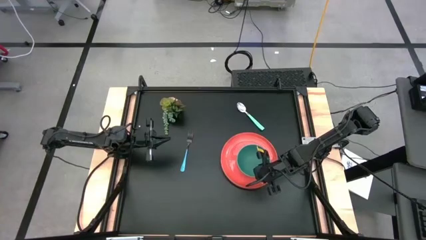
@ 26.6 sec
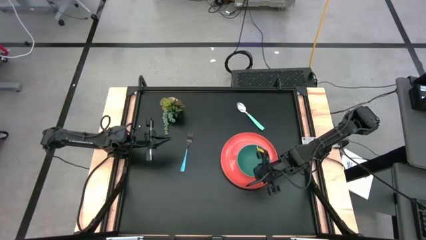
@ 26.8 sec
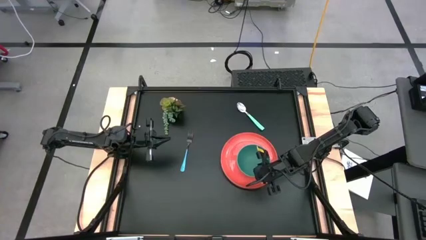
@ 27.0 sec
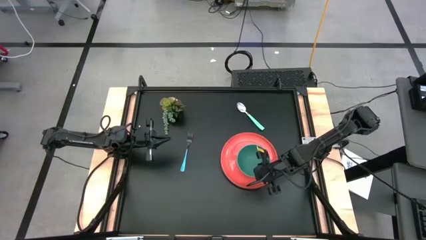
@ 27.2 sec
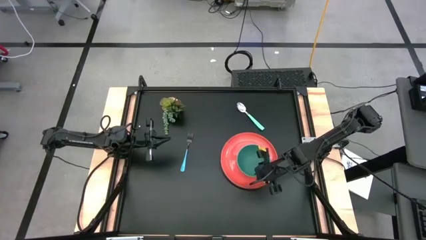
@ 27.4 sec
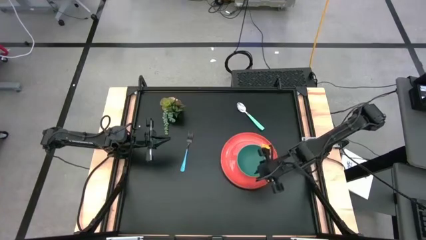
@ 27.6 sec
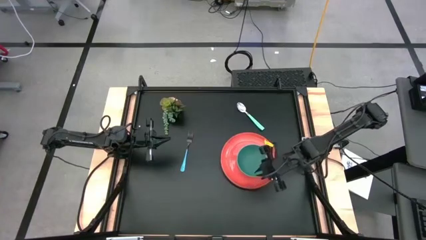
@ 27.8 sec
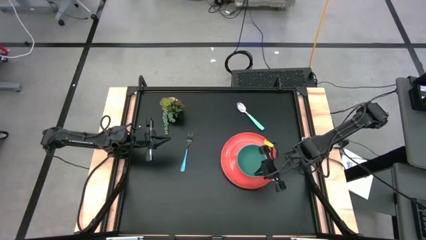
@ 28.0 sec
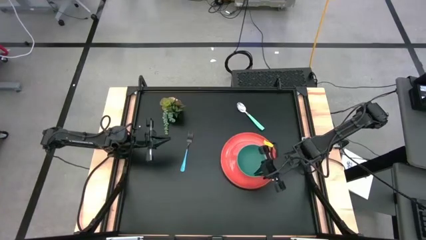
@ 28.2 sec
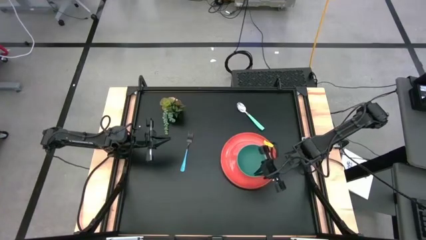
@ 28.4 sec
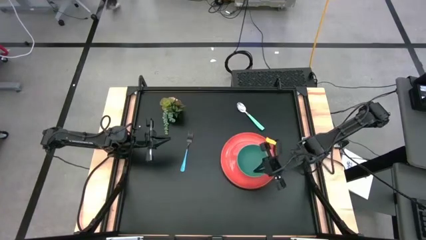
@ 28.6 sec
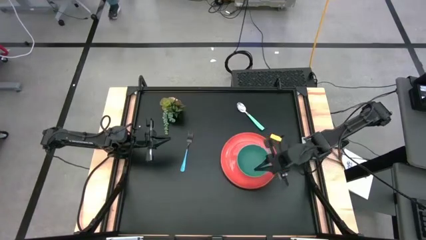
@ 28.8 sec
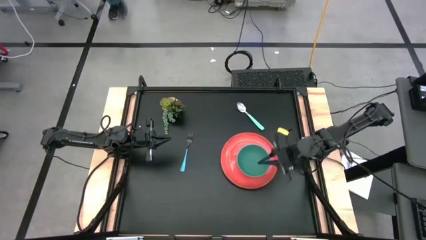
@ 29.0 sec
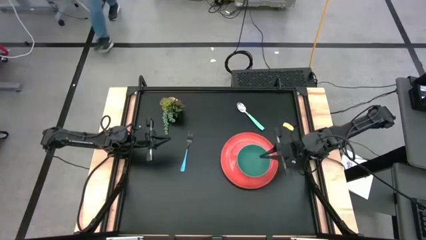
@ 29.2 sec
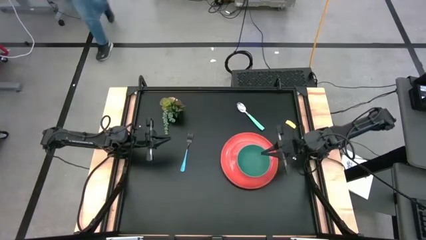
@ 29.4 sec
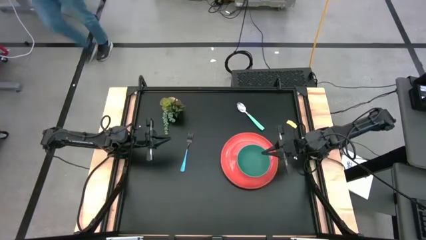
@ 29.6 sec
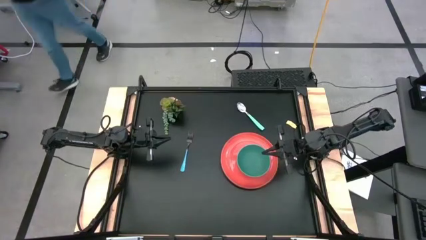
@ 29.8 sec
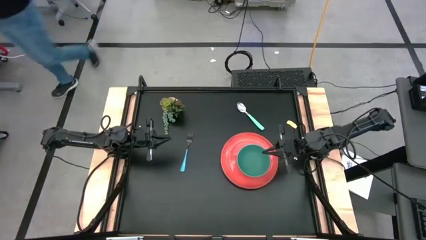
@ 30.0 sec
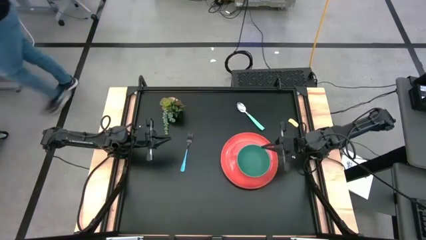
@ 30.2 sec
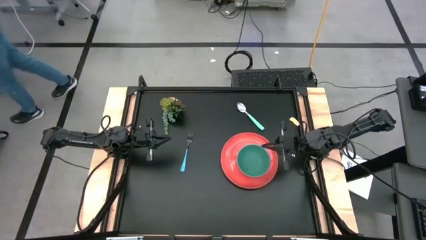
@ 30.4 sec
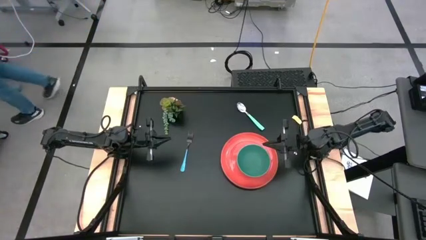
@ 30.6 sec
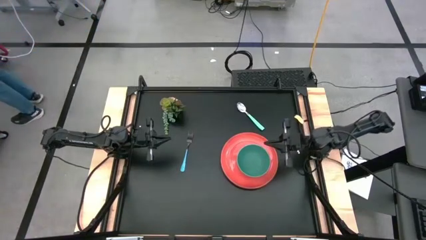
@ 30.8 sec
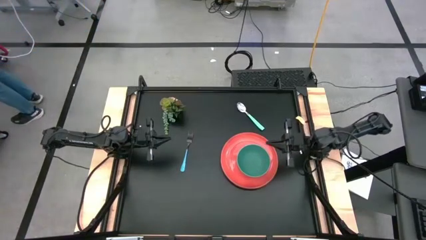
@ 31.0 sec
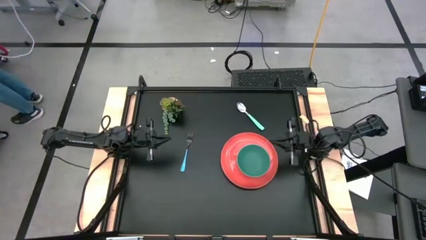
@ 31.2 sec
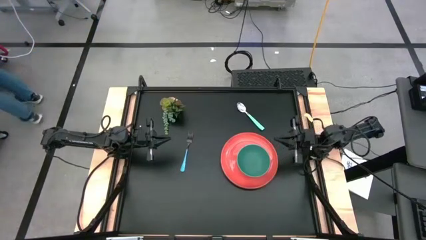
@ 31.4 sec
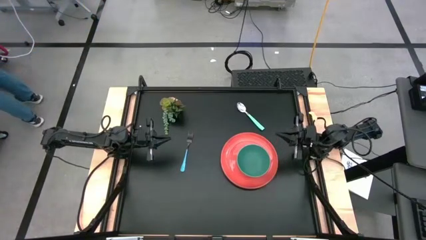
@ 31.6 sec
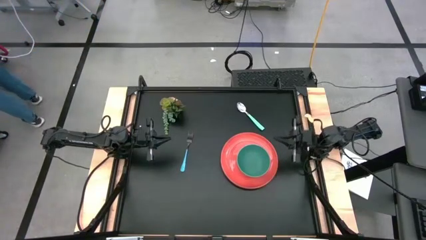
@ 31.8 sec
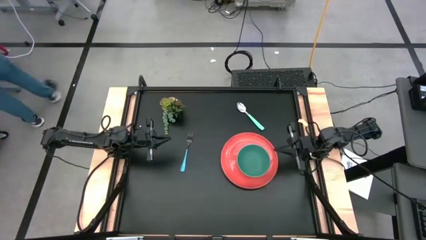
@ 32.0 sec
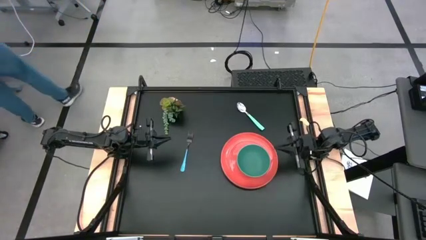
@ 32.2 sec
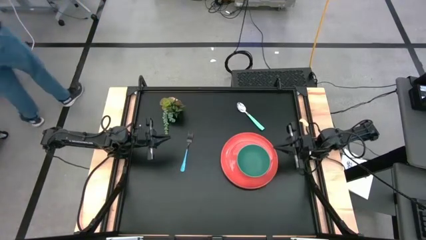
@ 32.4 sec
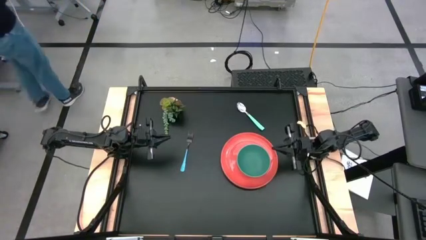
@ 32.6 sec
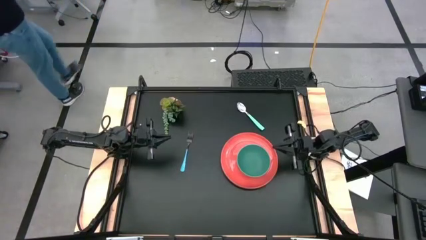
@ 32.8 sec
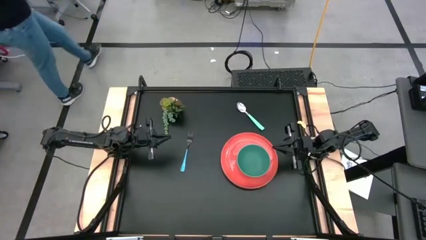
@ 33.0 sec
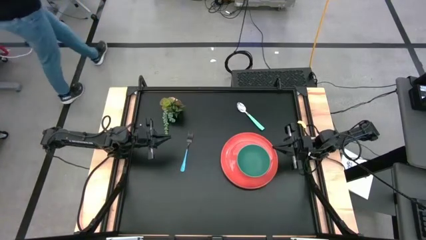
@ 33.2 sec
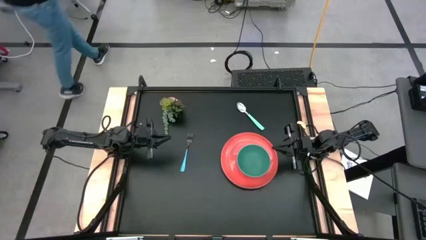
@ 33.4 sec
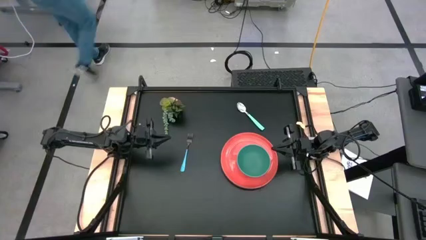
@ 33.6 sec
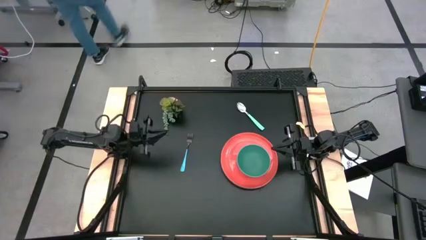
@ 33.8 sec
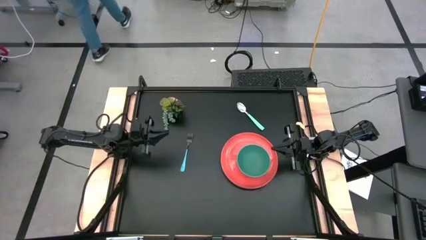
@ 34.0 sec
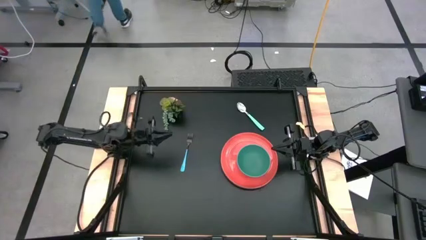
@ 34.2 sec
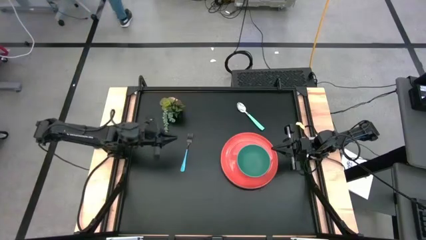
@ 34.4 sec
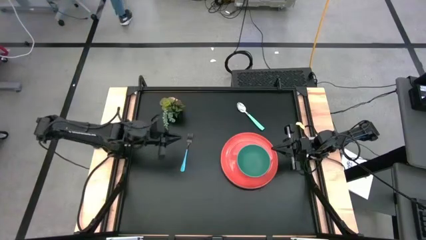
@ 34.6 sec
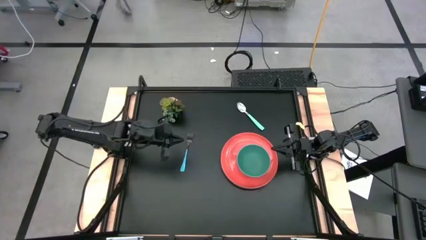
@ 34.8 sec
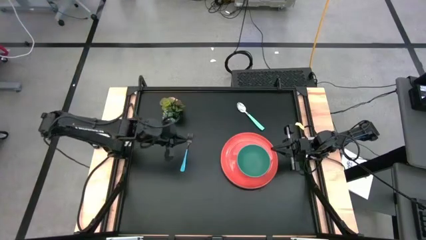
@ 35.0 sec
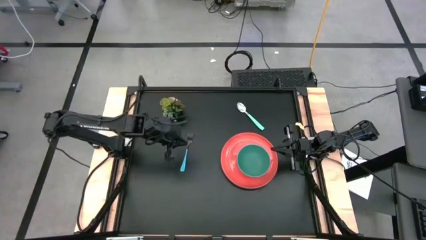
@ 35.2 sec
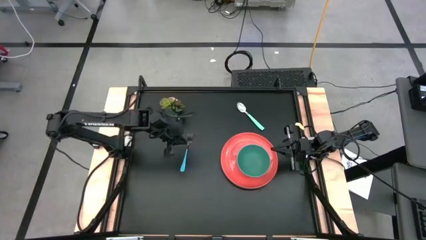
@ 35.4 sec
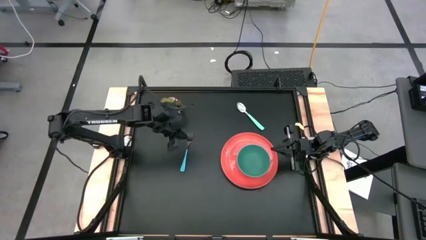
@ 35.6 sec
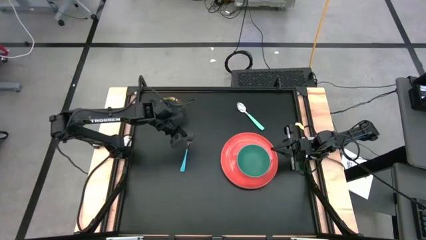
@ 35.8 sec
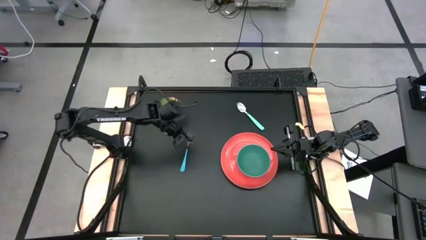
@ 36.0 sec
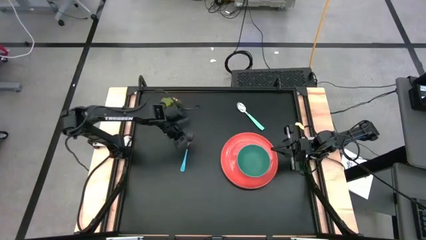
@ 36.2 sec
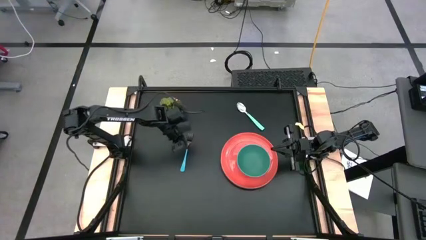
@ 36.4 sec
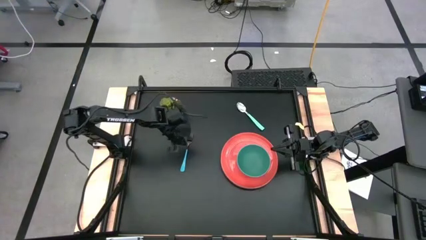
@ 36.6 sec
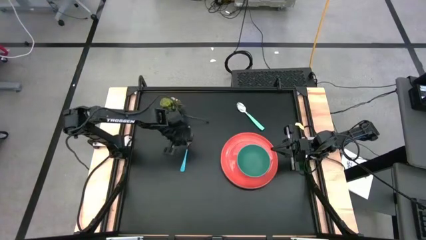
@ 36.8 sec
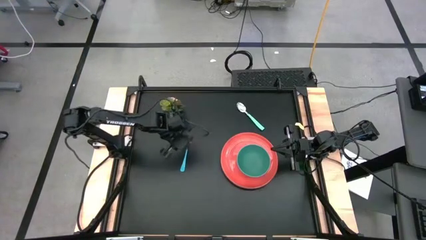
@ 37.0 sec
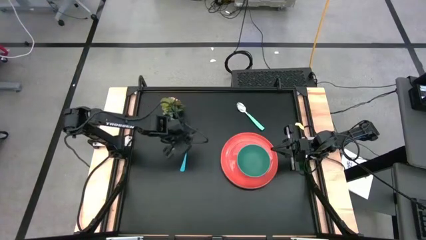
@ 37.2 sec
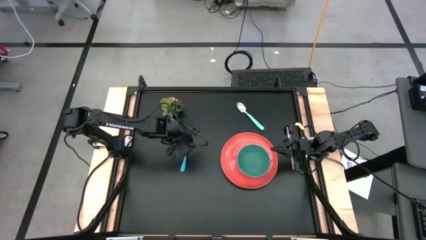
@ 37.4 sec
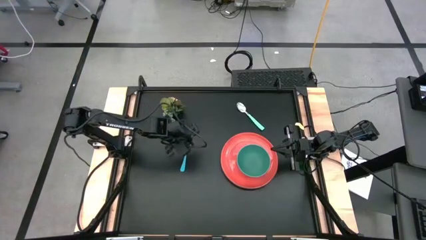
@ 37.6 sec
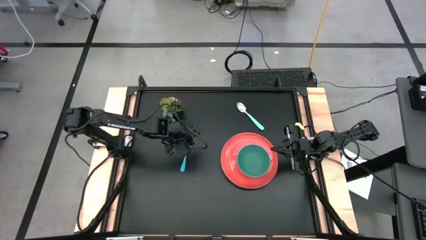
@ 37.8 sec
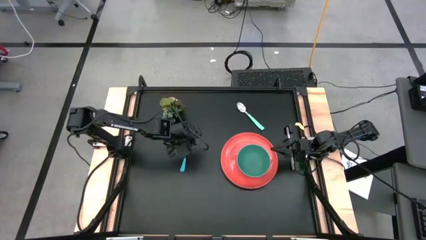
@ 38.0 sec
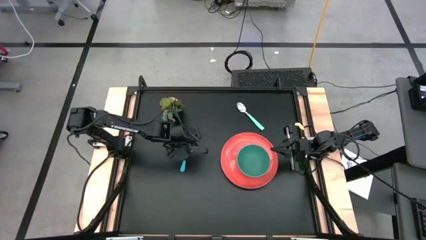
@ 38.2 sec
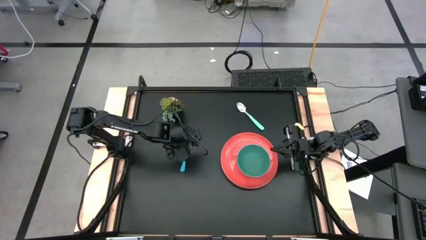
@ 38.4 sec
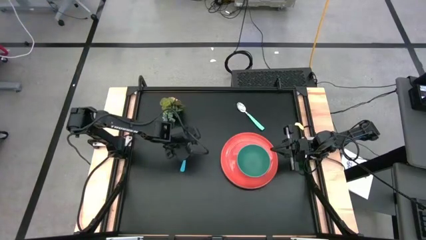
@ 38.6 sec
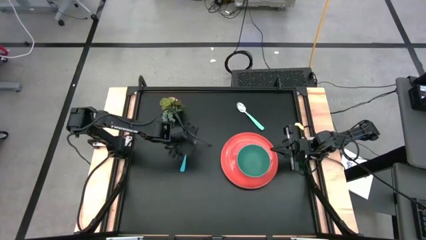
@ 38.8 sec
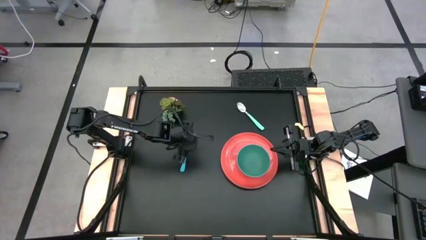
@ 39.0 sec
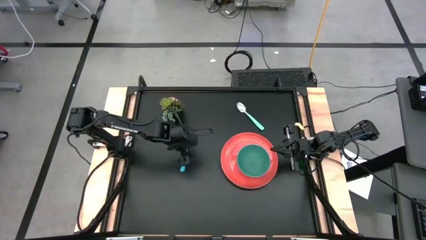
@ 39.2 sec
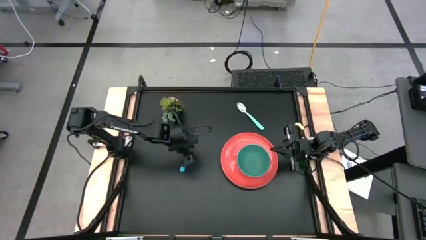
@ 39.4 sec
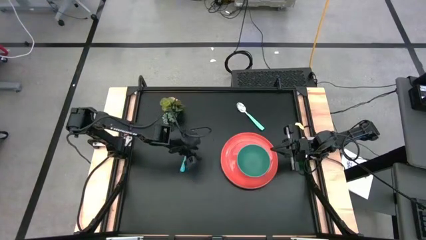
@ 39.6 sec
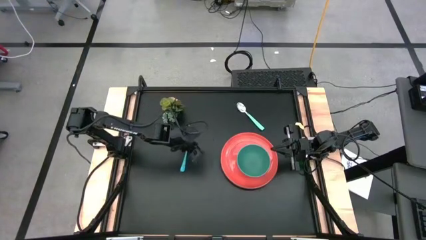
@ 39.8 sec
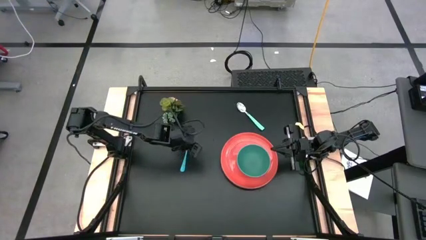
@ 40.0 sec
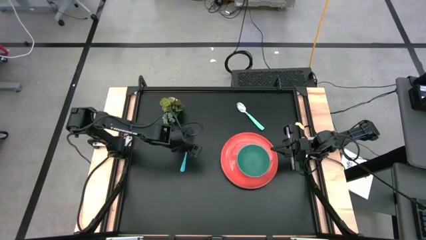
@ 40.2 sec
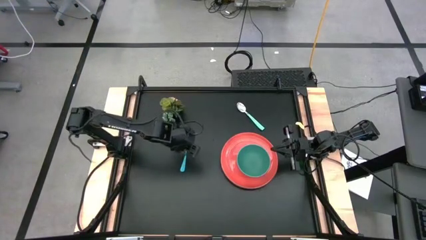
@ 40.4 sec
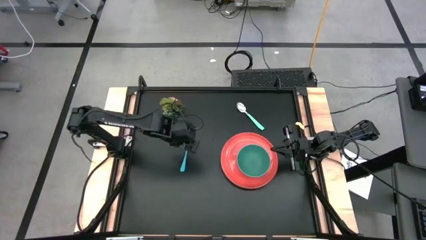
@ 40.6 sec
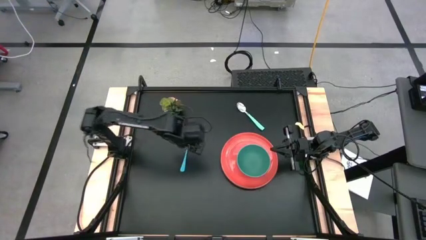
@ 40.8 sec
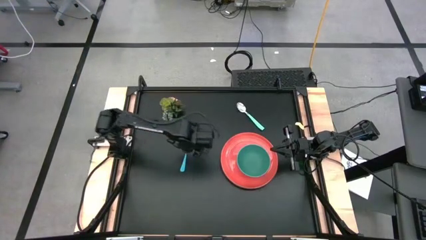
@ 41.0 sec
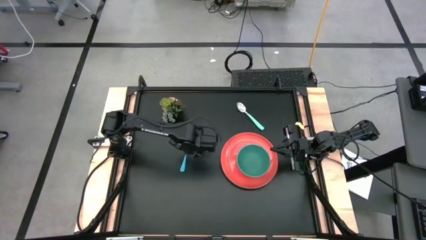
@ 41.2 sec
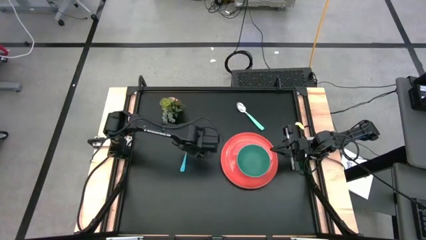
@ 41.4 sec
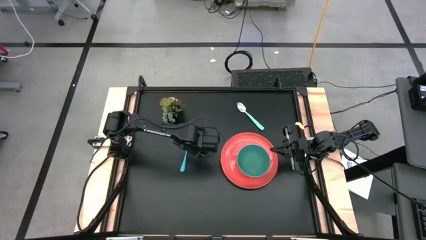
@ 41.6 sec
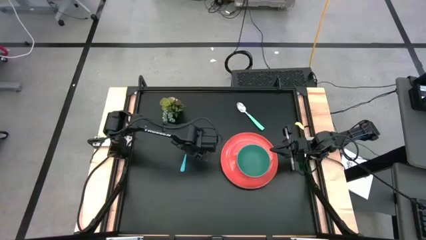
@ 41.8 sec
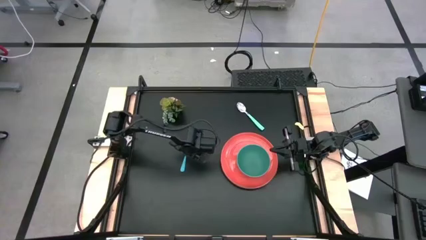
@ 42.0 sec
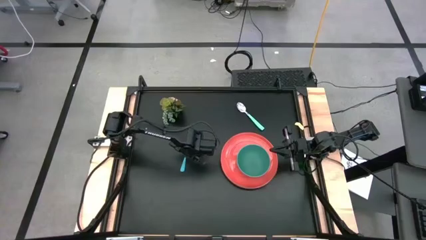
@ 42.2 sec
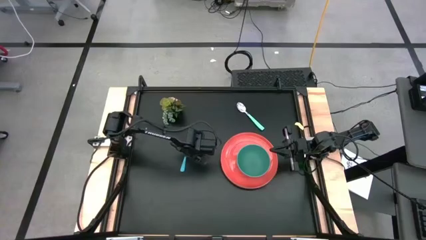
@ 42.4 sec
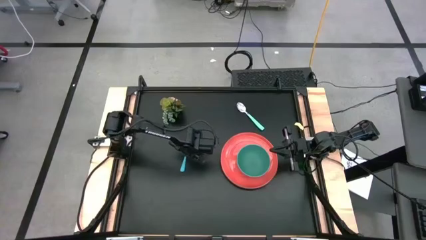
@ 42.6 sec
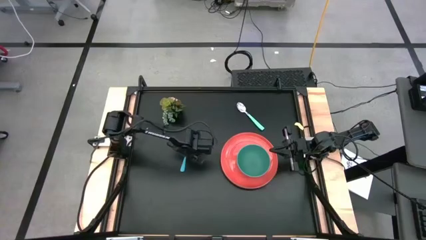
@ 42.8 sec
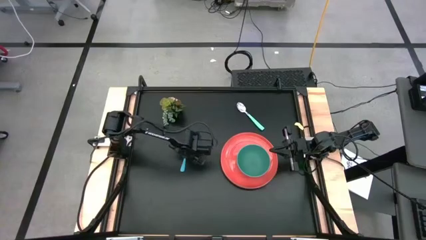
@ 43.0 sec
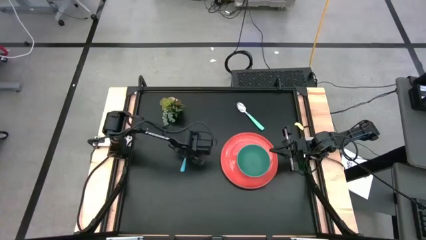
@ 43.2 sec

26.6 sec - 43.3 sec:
Task: Set table place
Put the blue fork on the orange plate to the left of the green bowl
